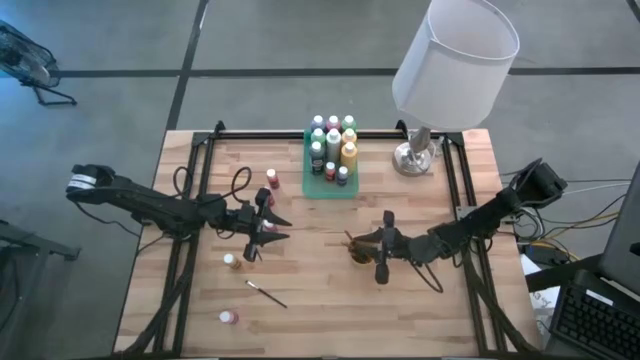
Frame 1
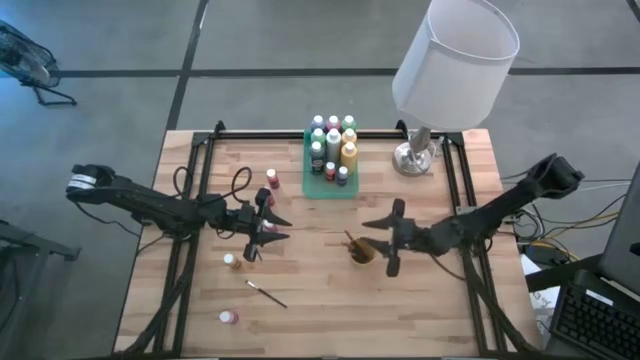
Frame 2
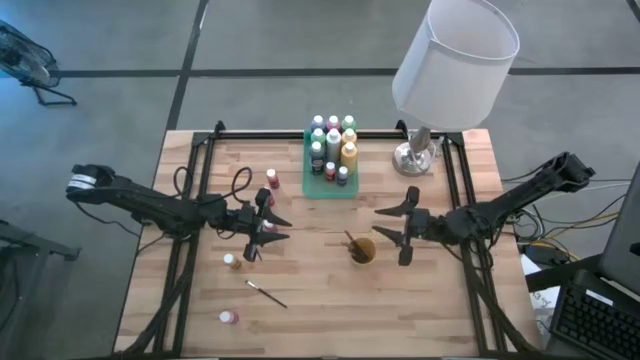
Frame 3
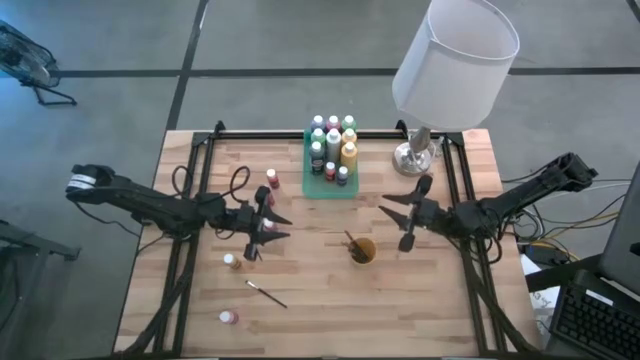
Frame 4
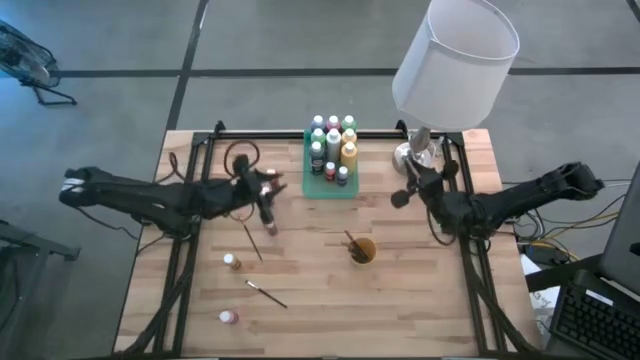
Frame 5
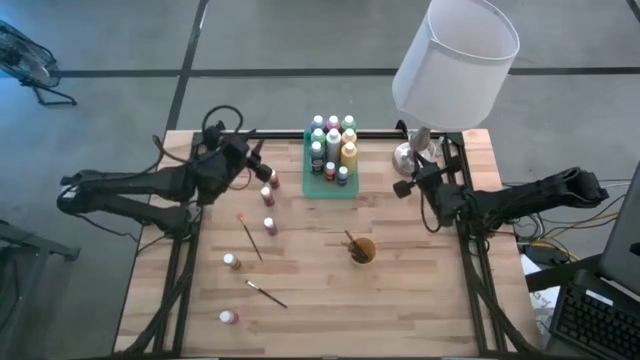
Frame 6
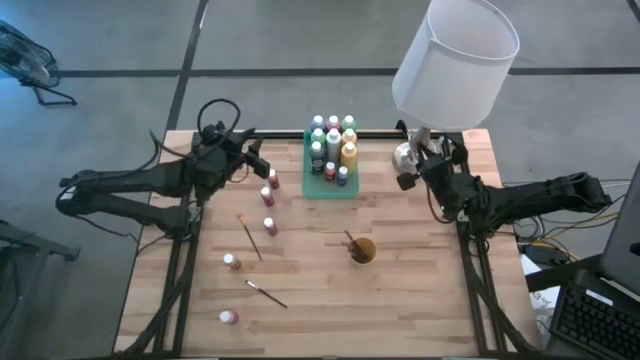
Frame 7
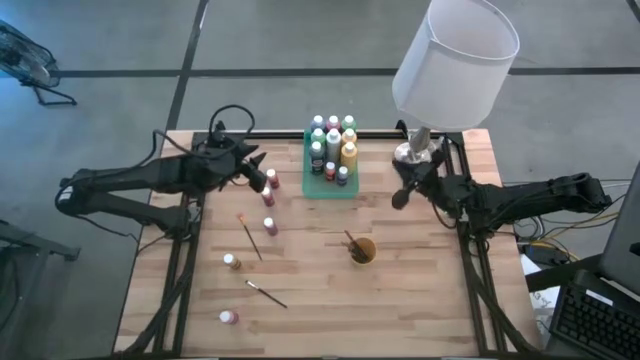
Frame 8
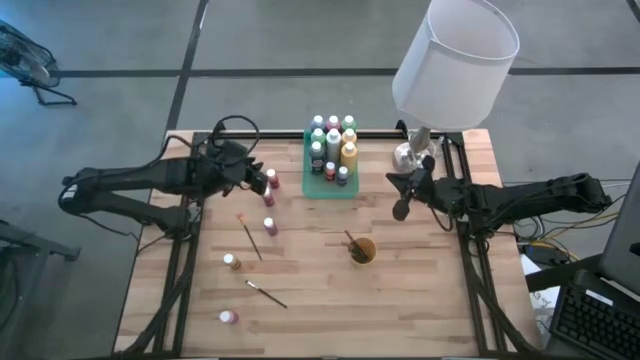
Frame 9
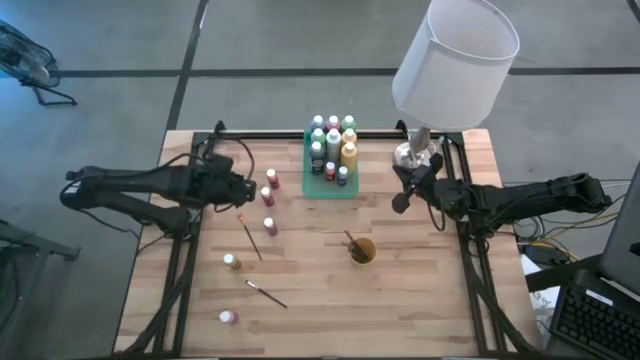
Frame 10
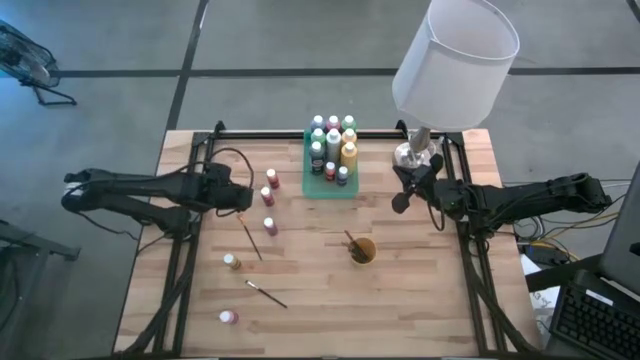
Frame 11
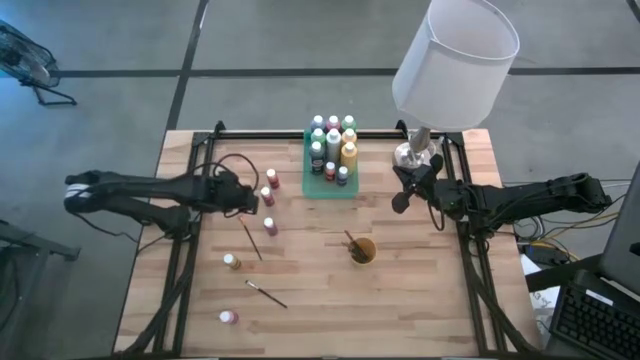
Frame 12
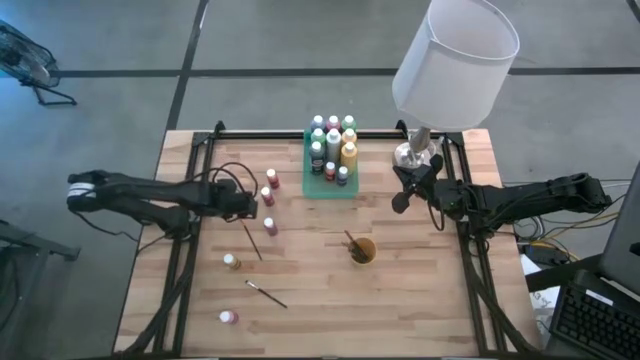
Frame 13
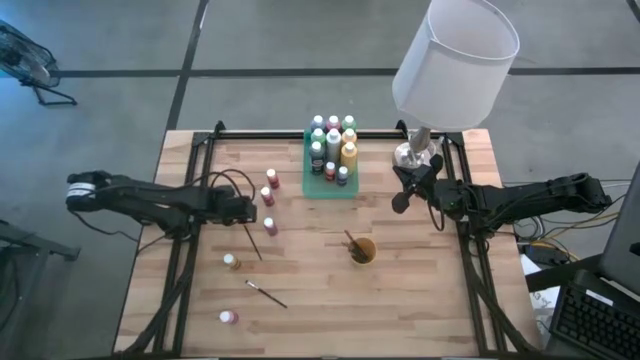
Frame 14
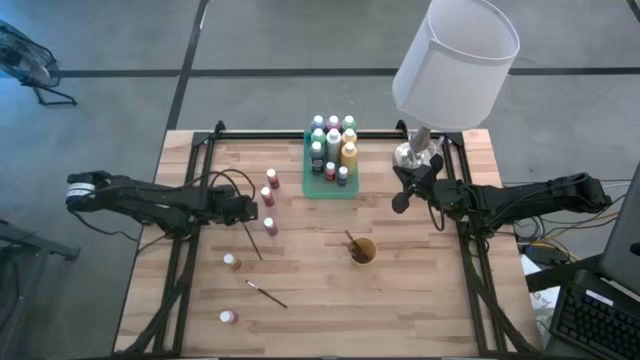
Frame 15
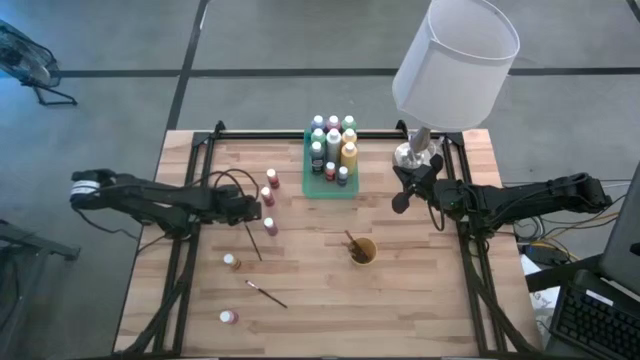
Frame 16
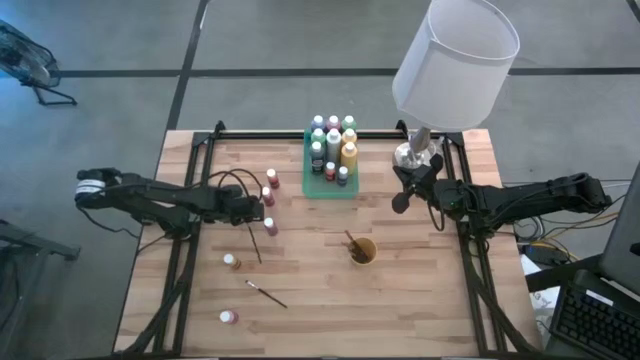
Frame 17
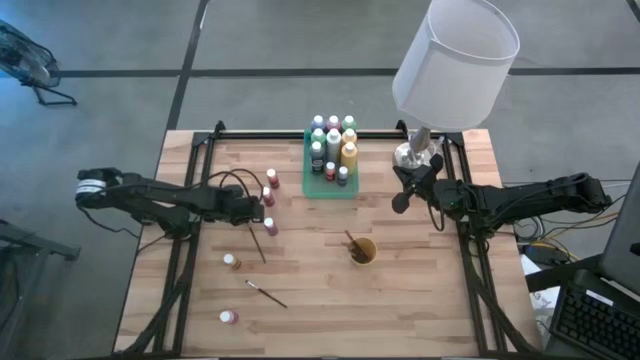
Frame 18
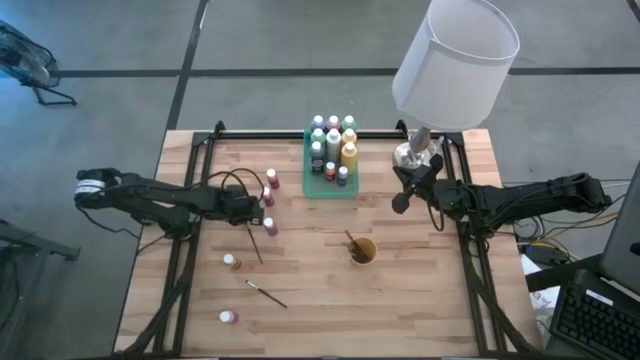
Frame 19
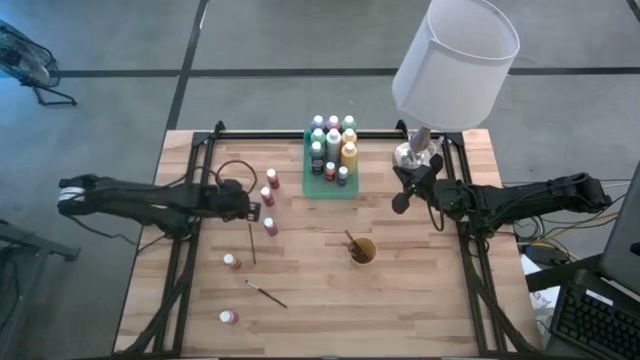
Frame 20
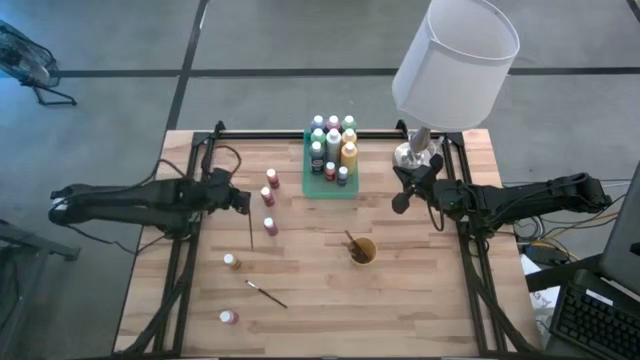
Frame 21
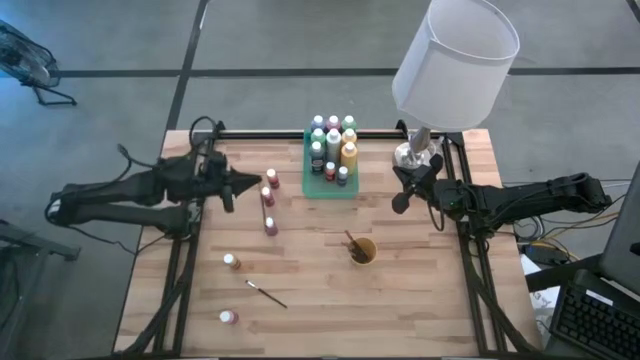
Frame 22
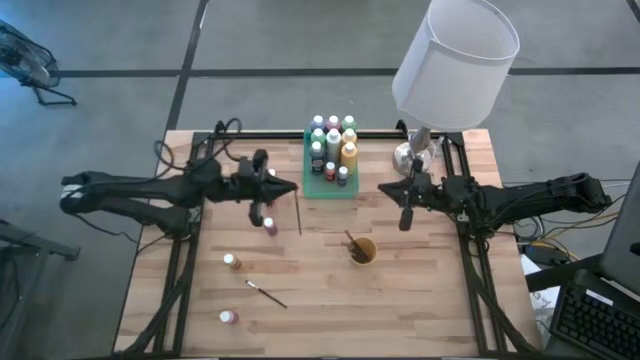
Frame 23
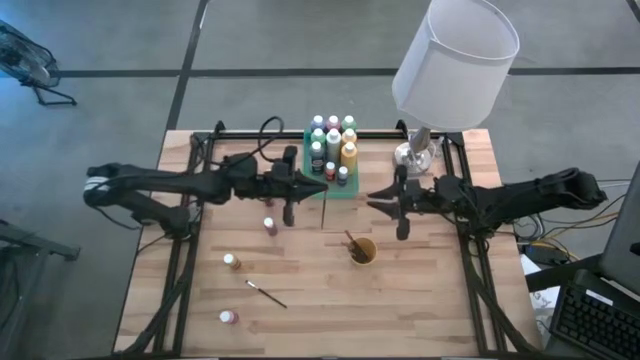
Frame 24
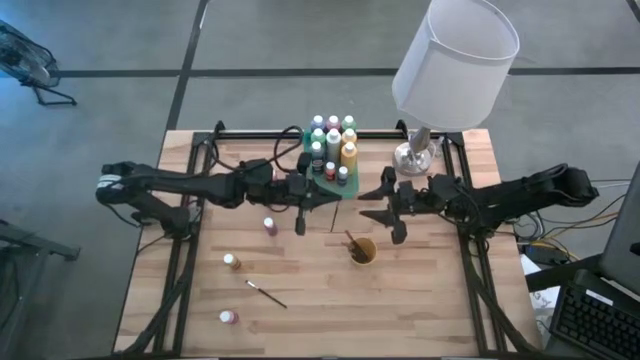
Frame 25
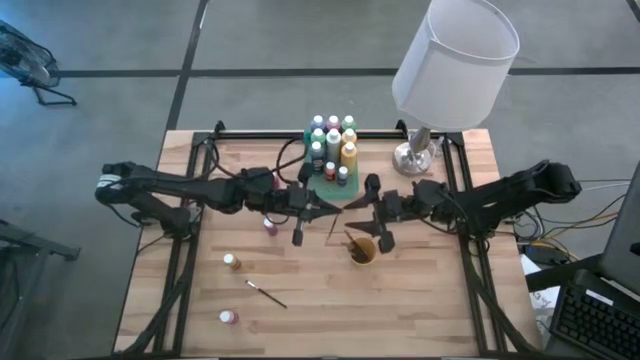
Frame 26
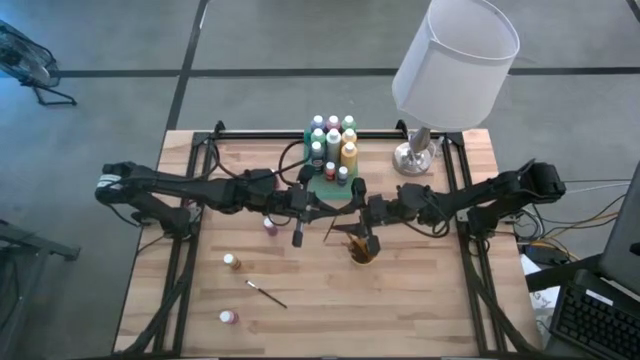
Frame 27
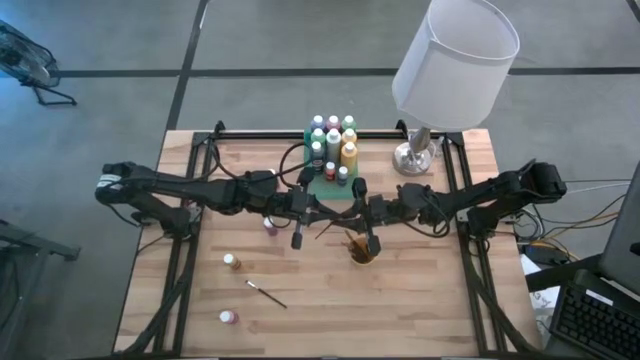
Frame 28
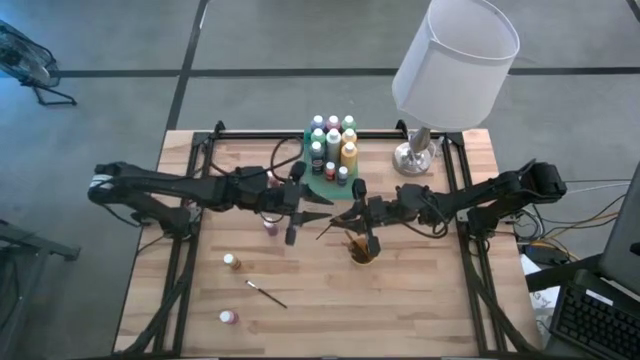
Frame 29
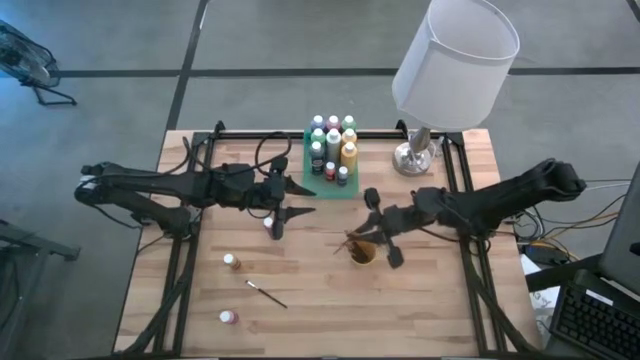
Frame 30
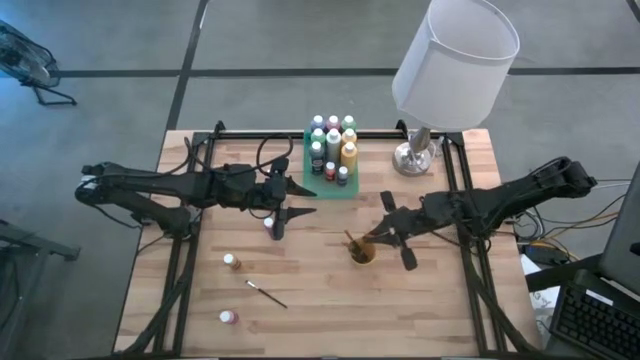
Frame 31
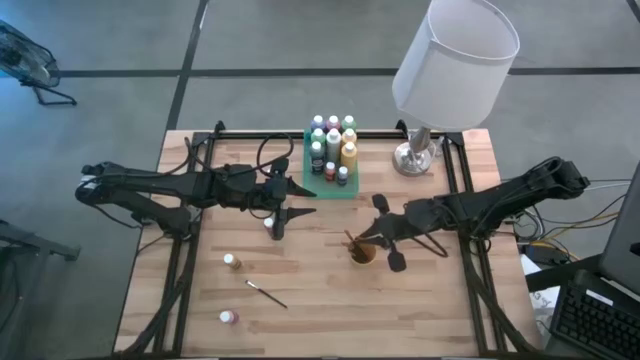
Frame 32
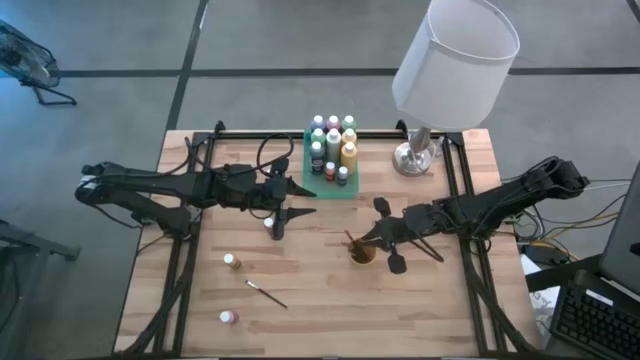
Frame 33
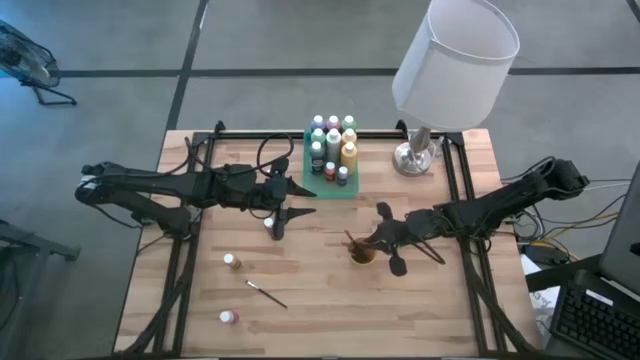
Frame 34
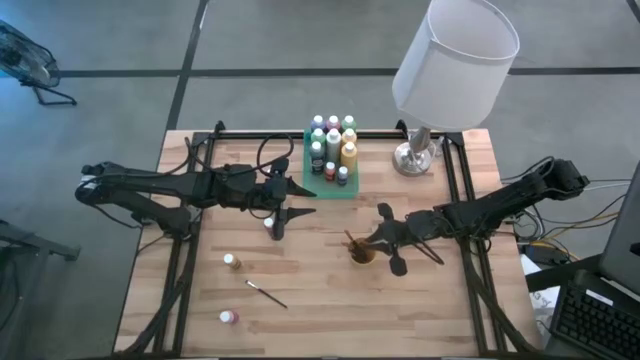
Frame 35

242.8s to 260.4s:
Task: Pick & Place Paint Supplies
Put the orange paintbrush into the yellow cup

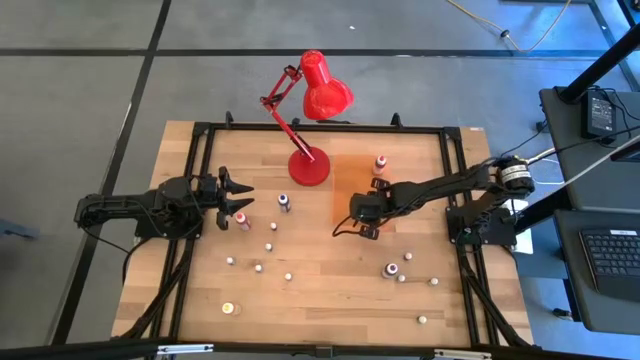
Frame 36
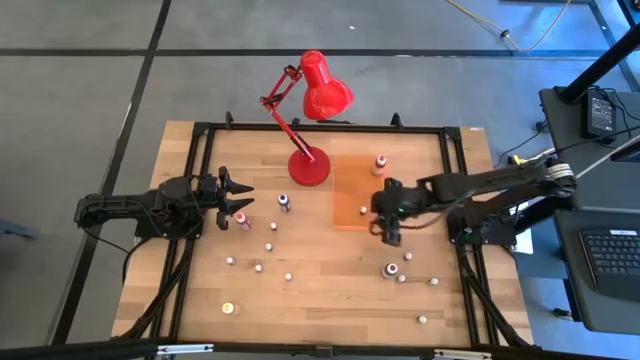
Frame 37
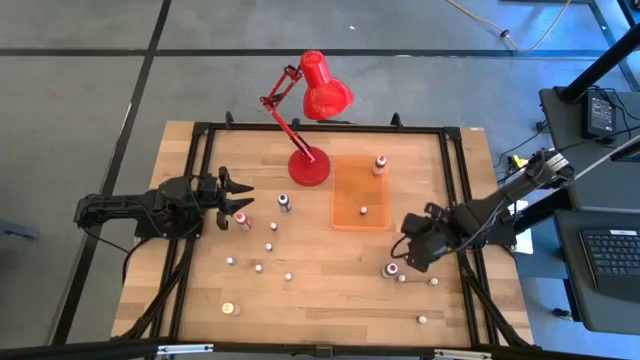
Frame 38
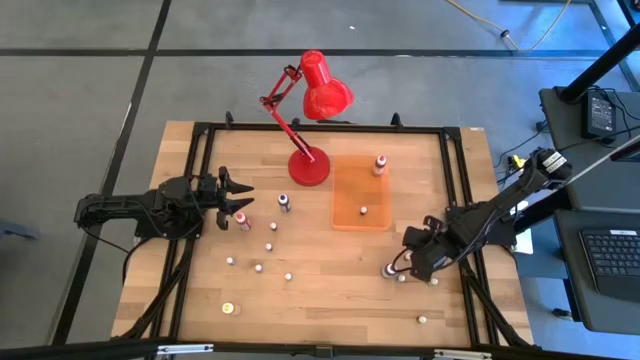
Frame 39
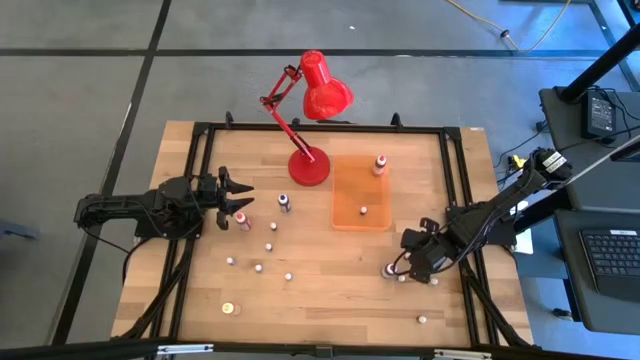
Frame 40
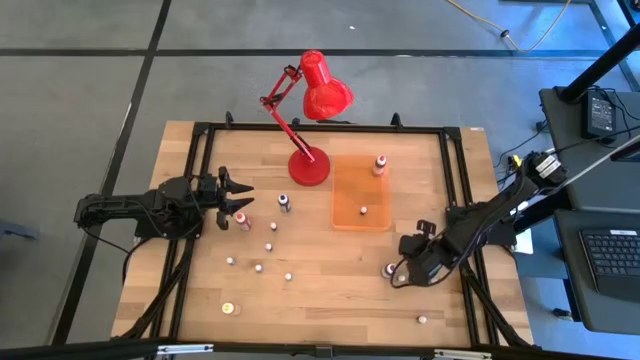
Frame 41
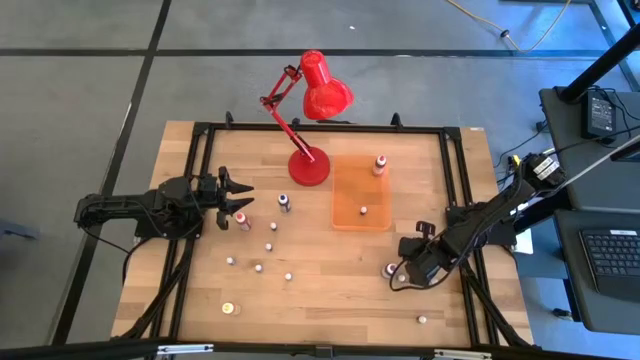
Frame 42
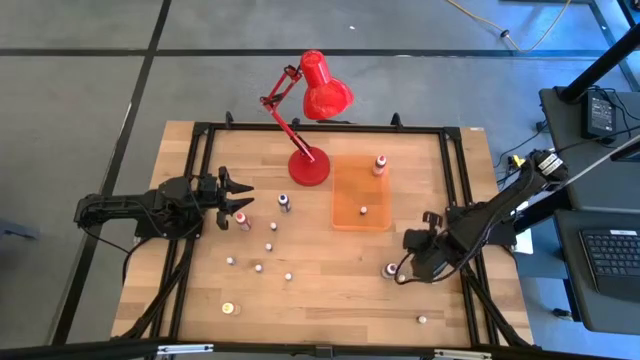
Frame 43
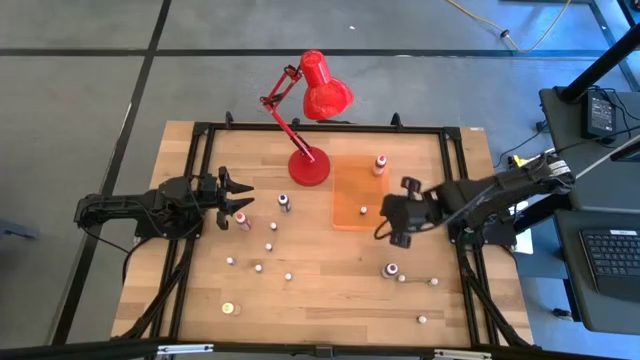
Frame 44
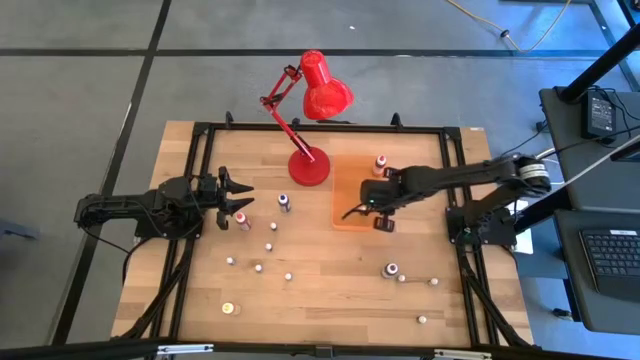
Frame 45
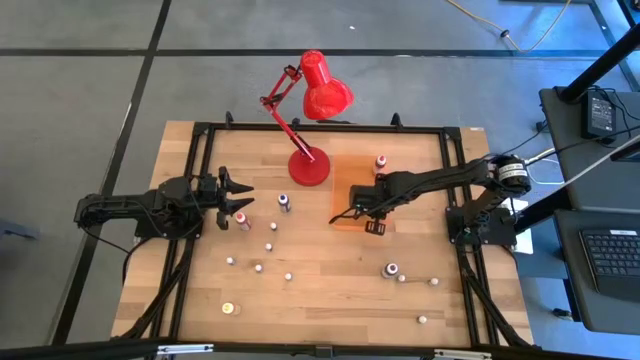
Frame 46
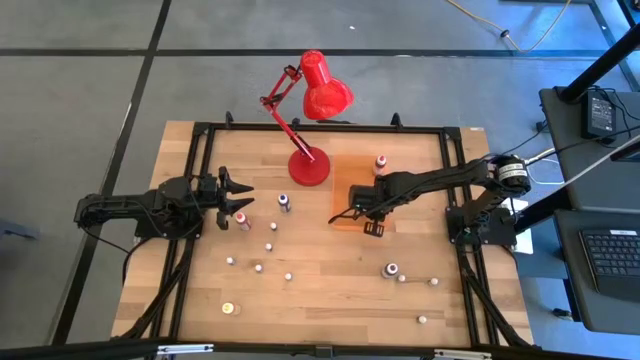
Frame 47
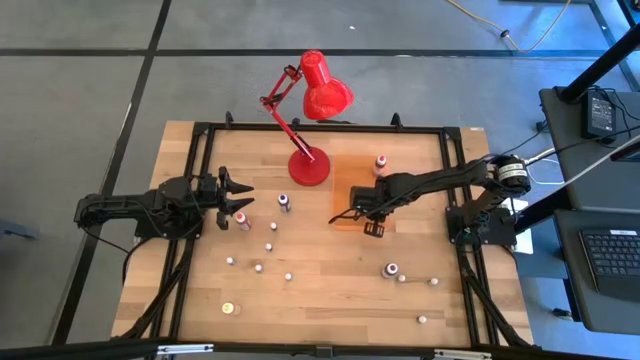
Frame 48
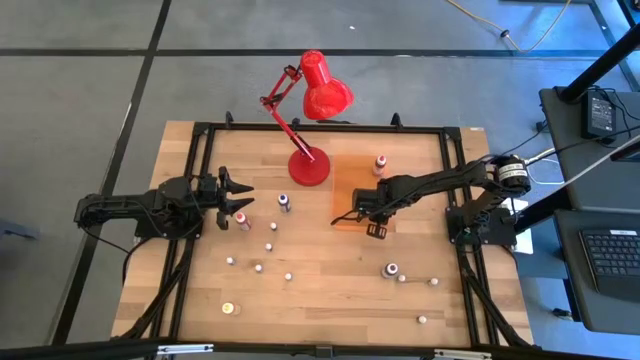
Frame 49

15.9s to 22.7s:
Task: Pick & Place food coloring
Put the right small pink food coloring bottle into the orange bin
